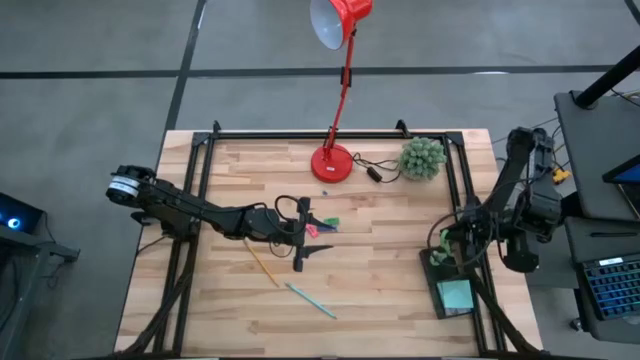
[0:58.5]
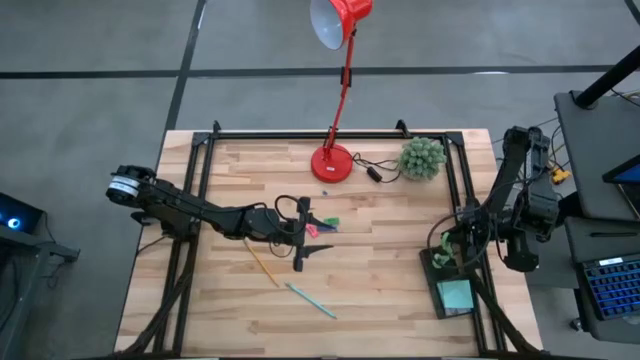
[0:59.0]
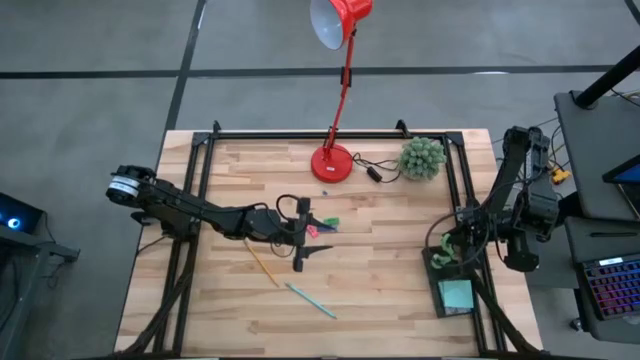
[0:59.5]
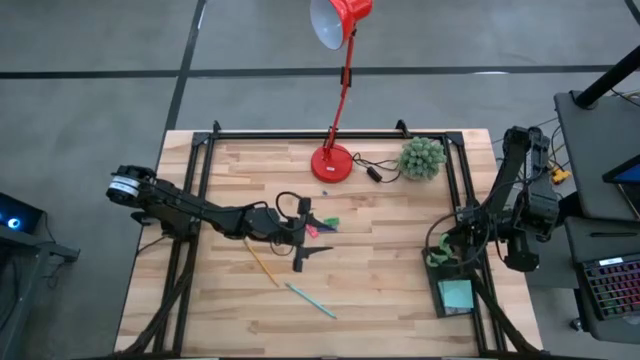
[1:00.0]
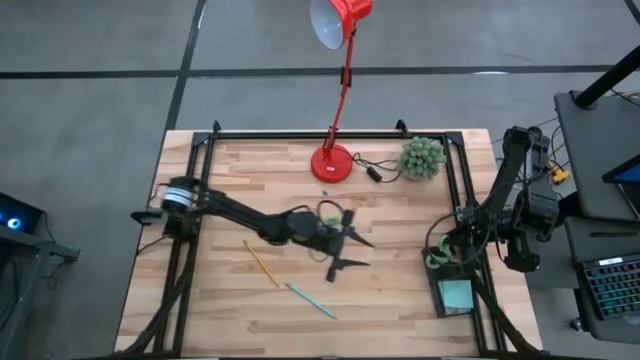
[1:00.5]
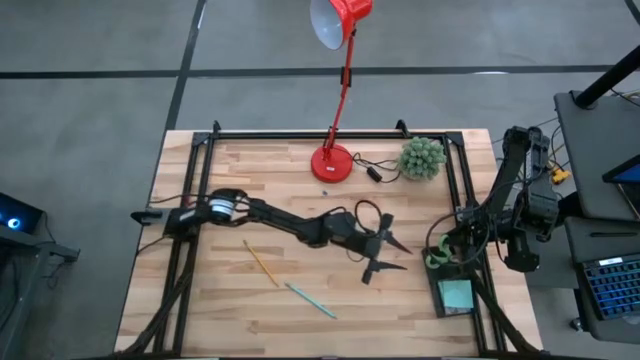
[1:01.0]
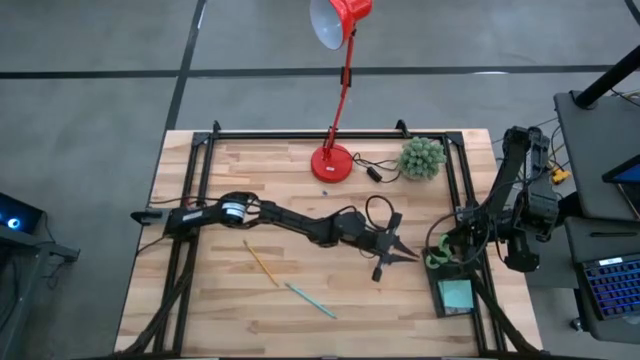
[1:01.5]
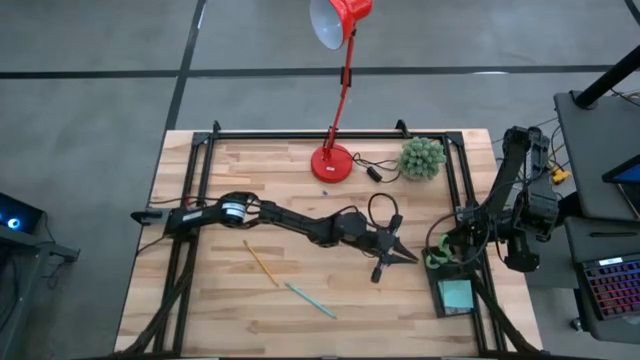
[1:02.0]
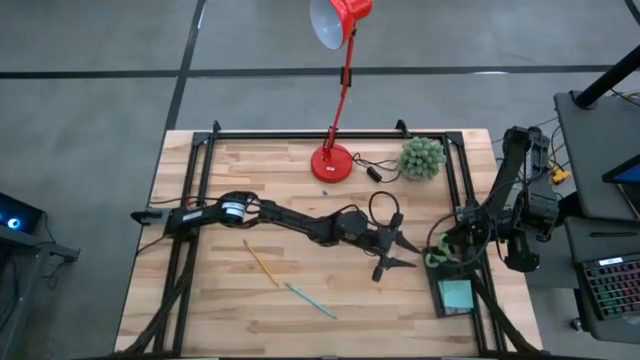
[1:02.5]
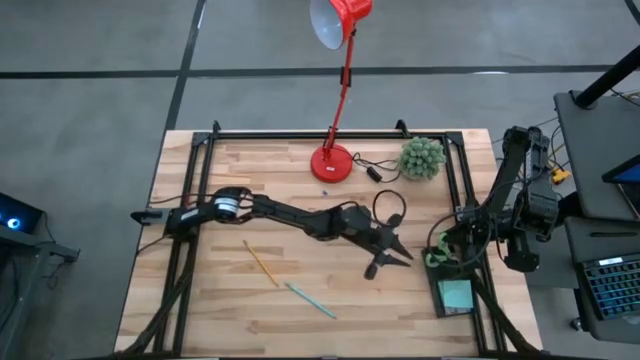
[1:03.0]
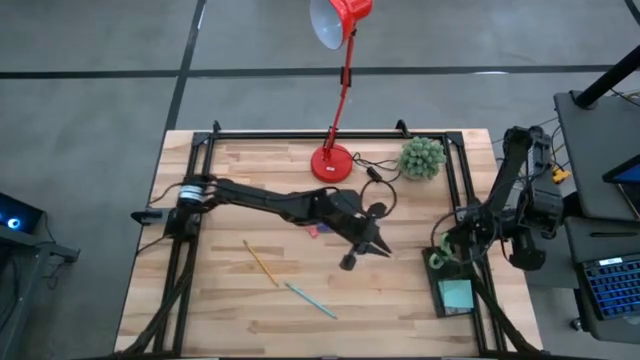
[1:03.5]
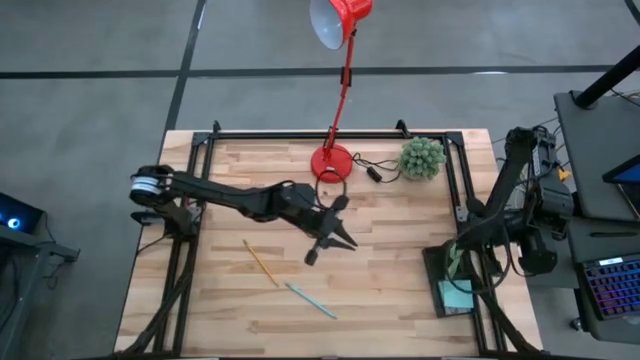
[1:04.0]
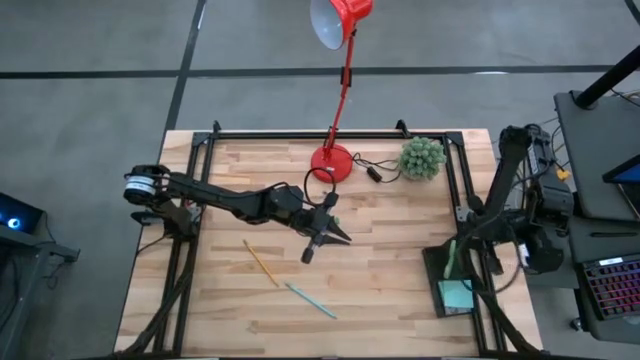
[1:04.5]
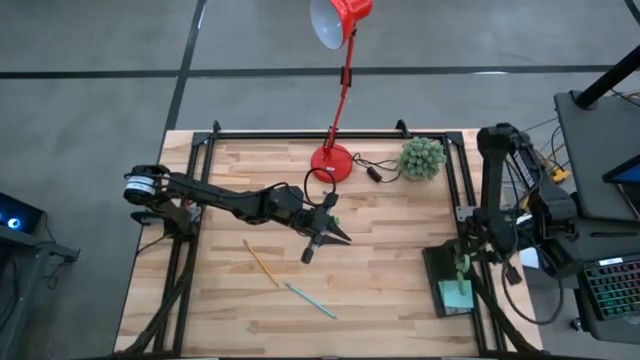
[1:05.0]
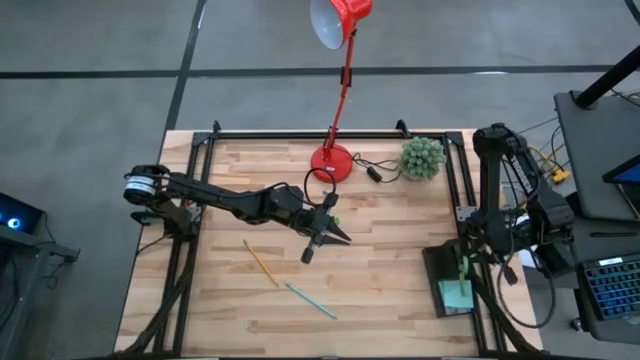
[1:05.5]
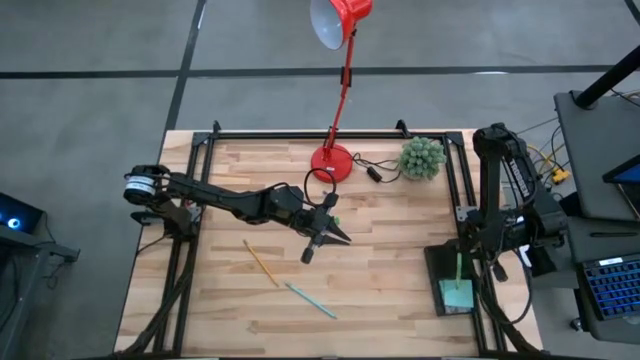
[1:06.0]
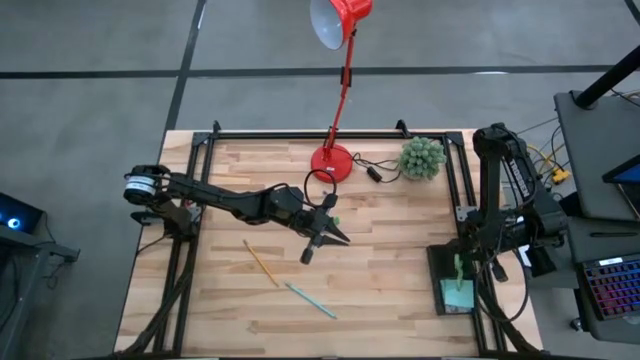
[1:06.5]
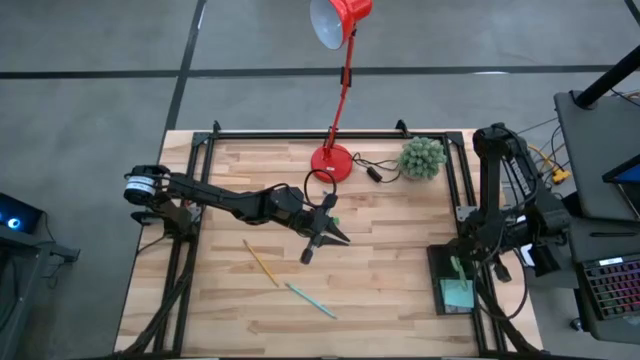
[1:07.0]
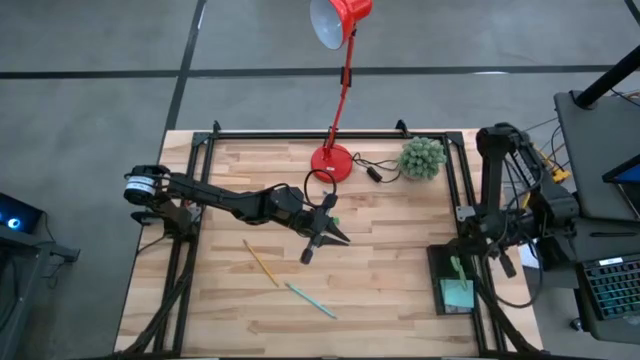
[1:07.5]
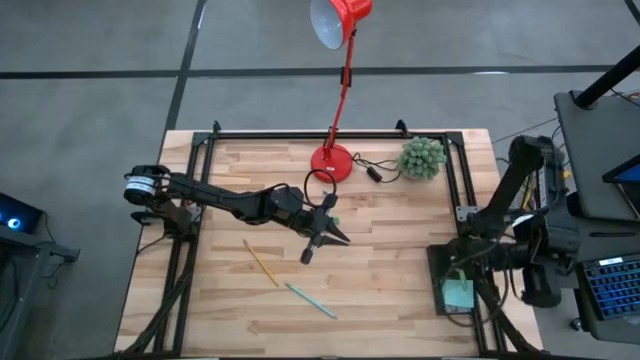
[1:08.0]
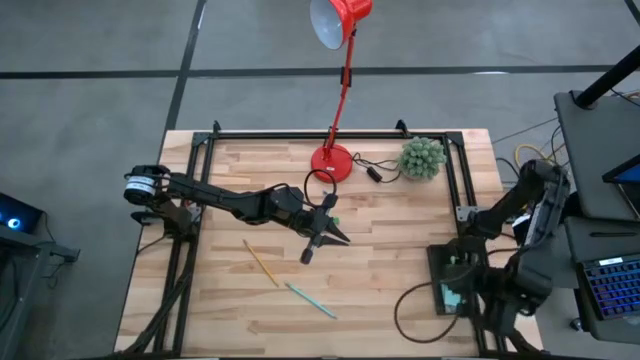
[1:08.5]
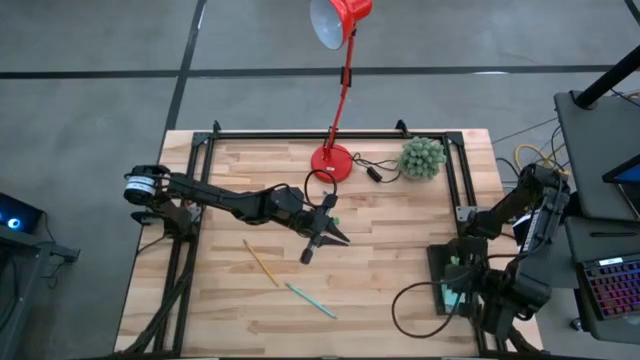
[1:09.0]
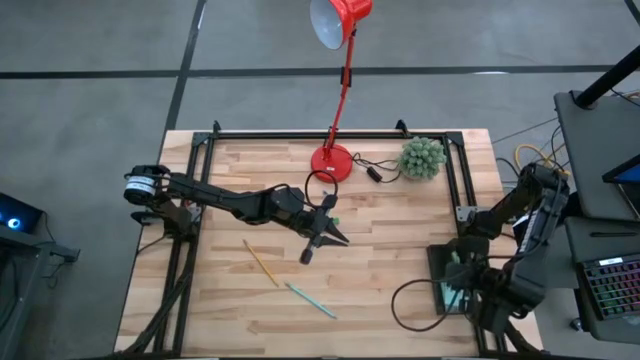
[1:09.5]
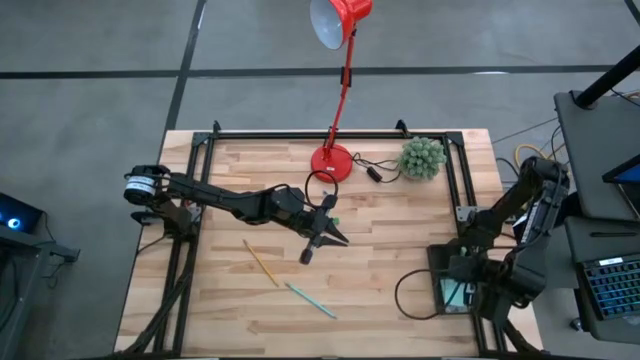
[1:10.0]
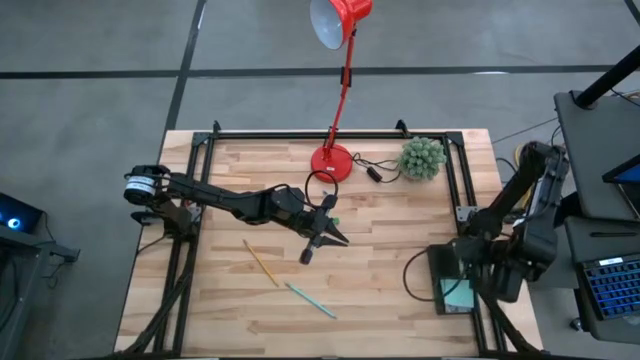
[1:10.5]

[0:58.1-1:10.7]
Task: Pick and place office supplies into organizer
Put the green scissors into the black desk organizer

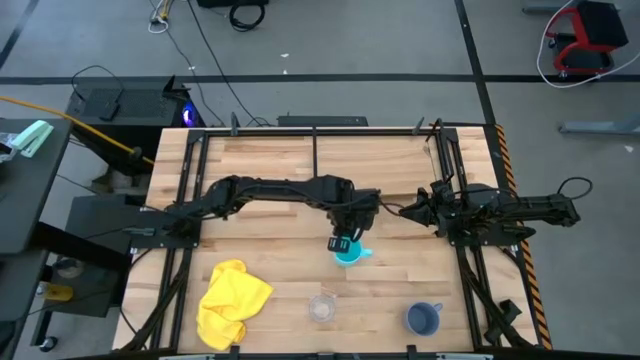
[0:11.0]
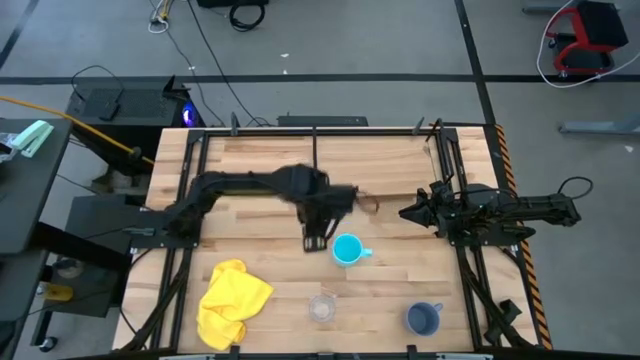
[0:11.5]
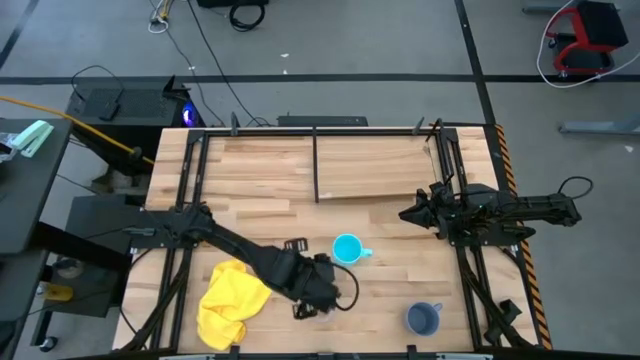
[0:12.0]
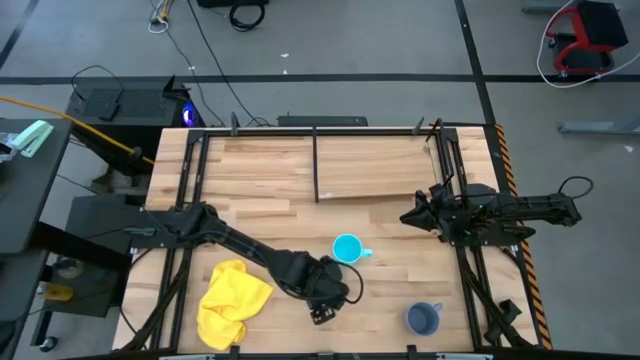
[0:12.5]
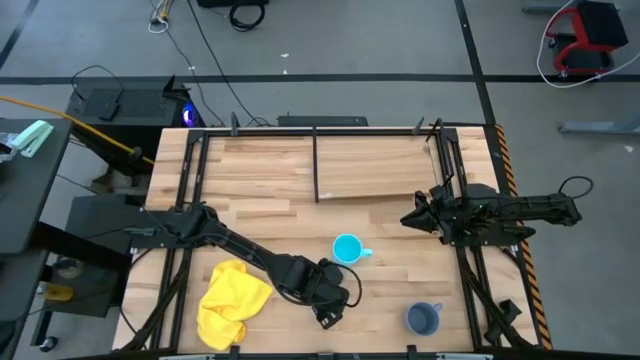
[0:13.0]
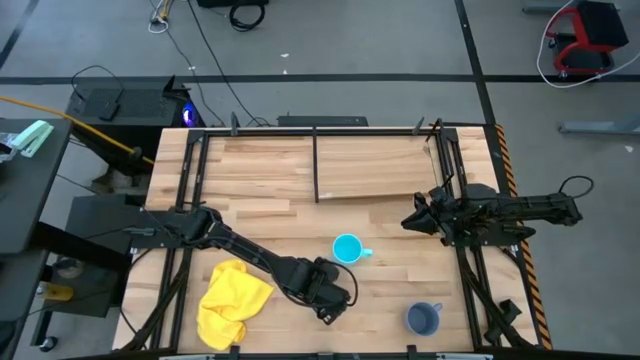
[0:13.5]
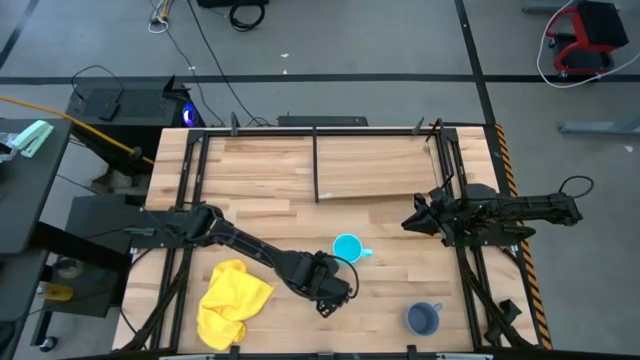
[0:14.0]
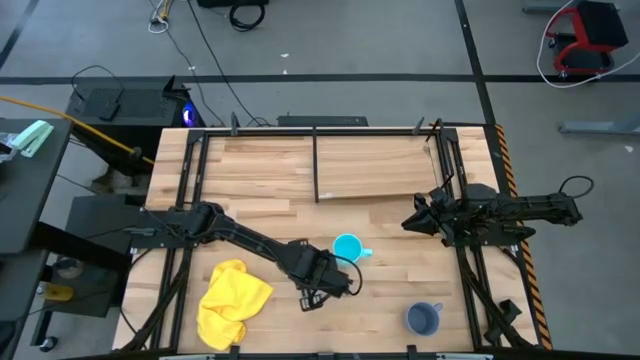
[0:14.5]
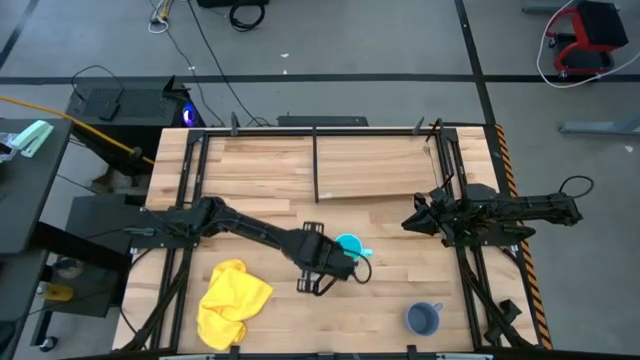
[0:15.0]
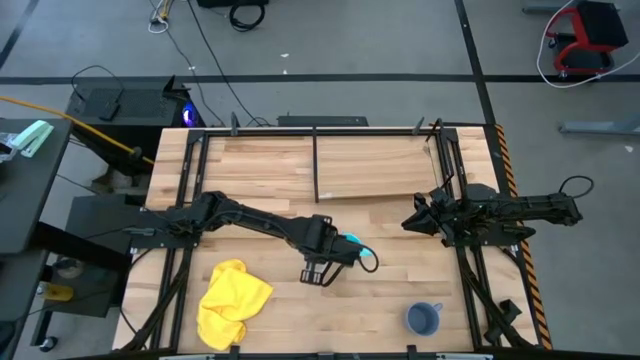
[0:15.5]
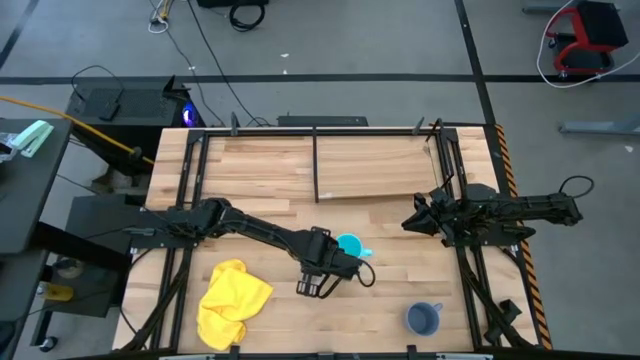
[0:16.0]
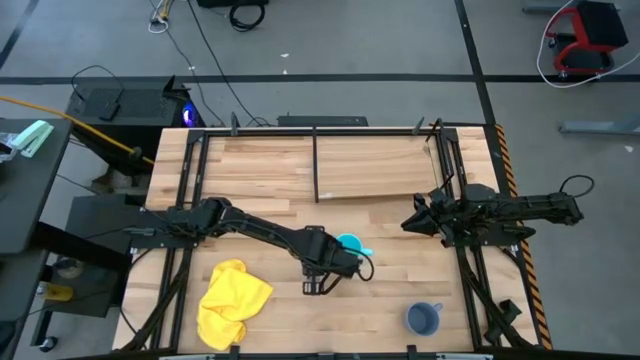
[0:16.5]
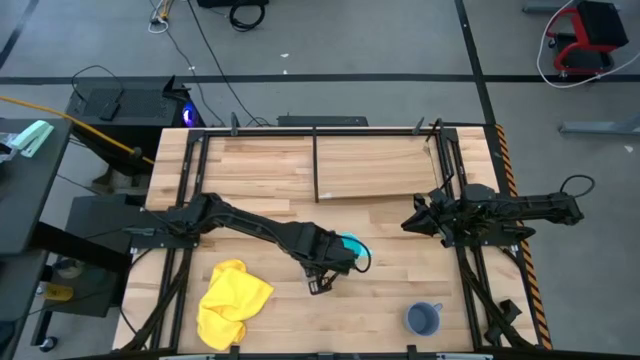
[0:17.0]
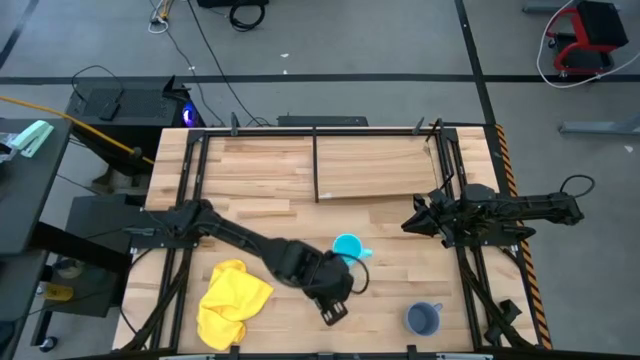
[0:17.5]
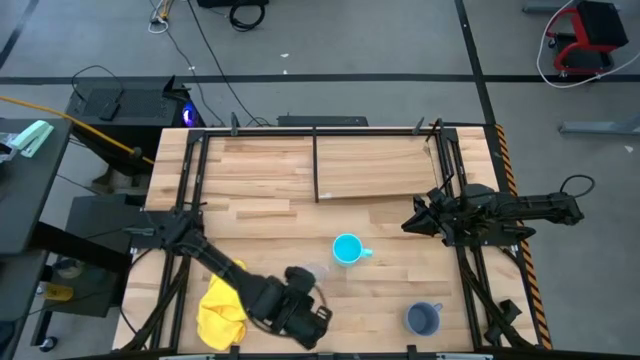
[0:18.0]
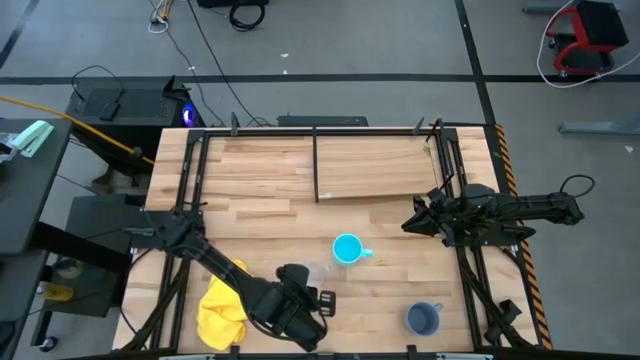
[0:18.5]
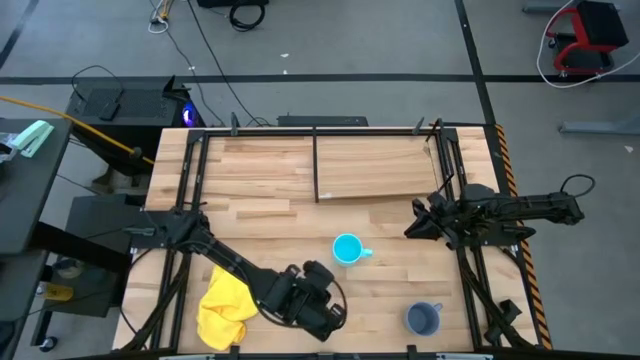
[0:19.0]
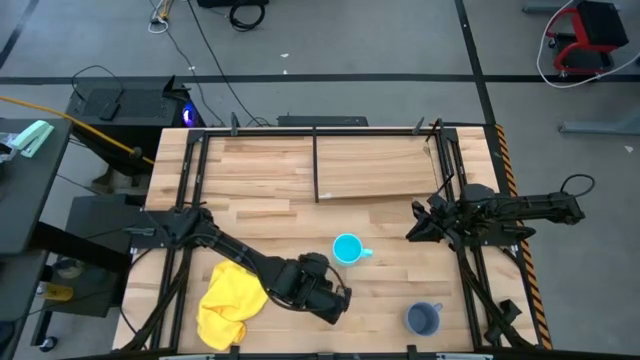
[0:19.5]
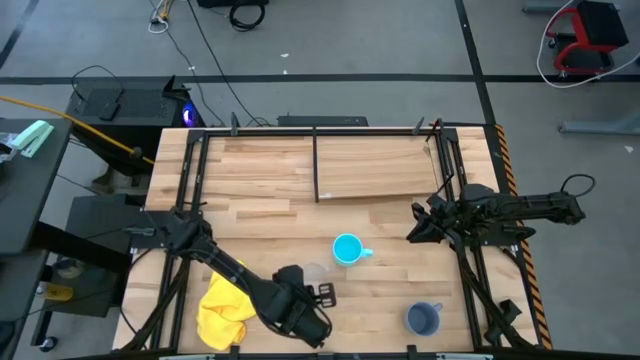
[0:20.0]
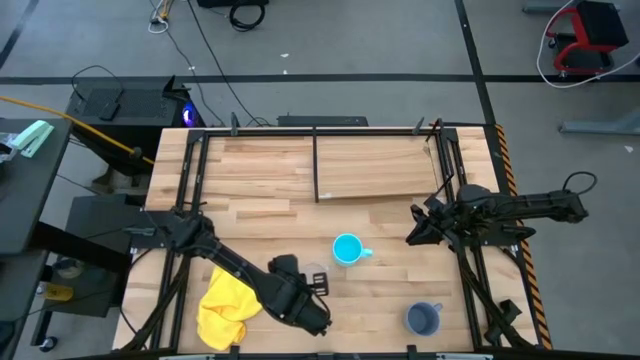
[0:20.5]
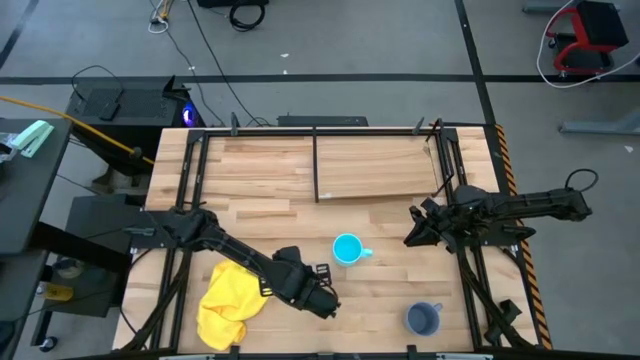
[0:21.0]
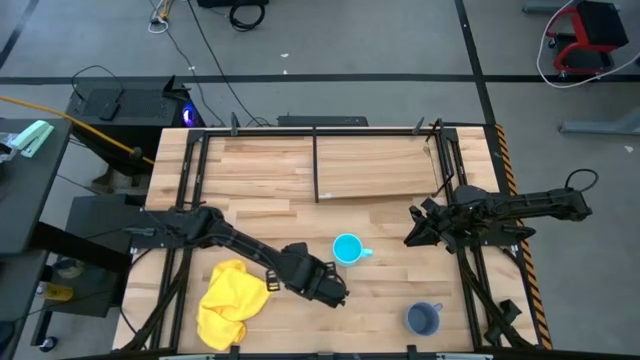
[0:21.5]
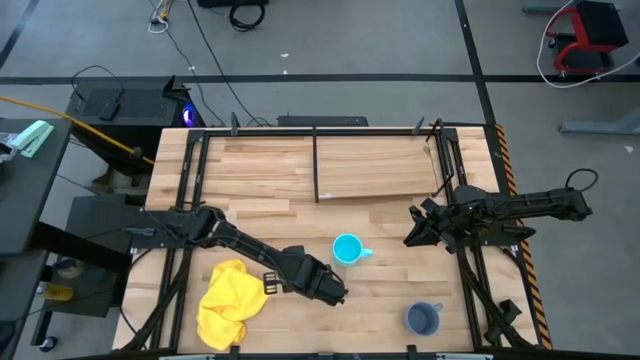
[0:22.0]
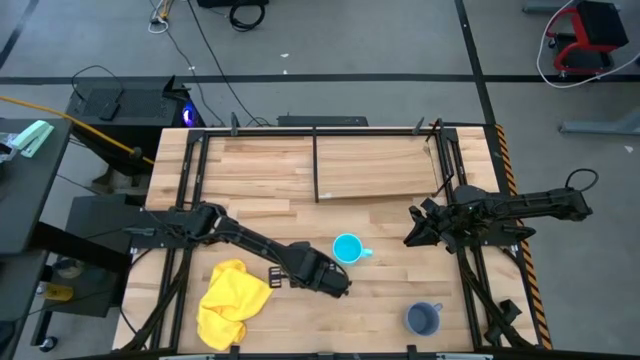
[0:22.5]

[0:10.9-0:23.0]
Task: Stack small to large cups/mugs on shelf
Put the transparent mug on the shelf
